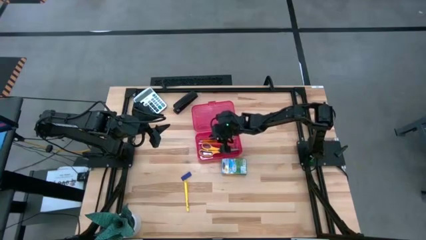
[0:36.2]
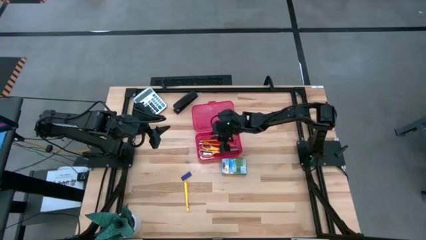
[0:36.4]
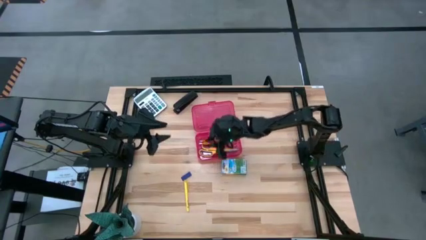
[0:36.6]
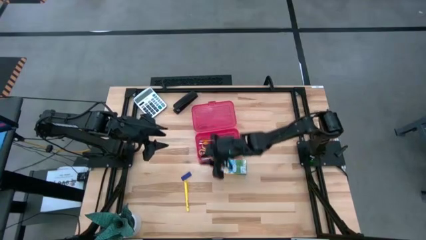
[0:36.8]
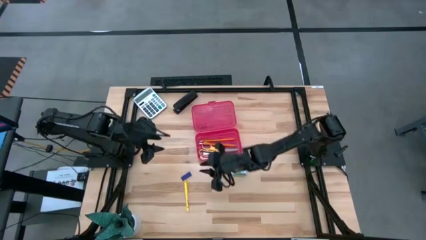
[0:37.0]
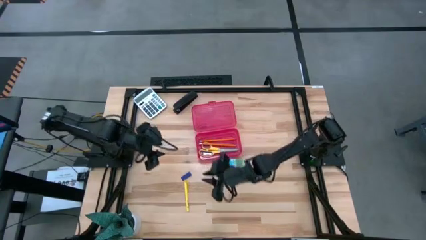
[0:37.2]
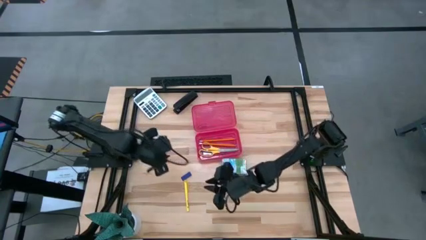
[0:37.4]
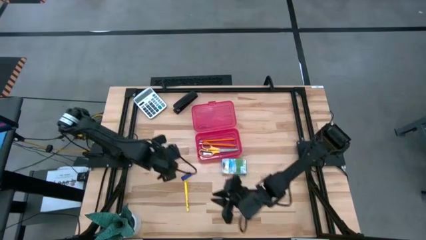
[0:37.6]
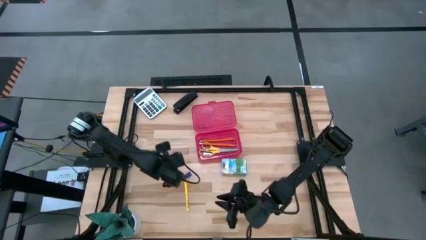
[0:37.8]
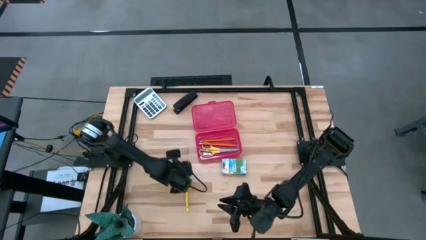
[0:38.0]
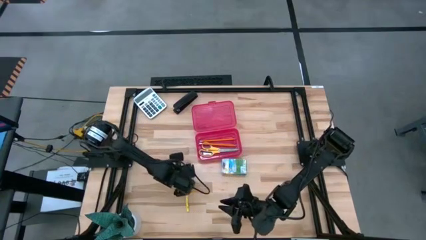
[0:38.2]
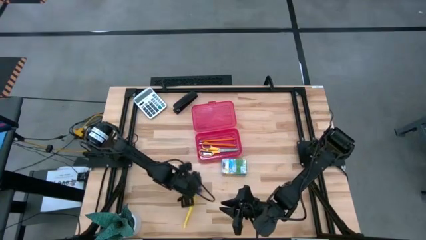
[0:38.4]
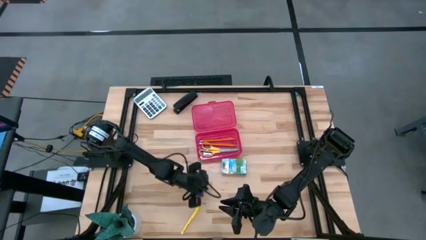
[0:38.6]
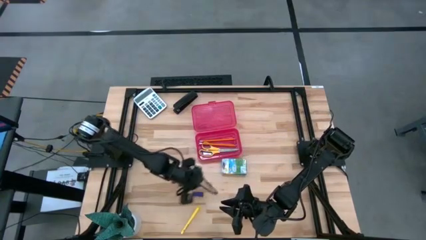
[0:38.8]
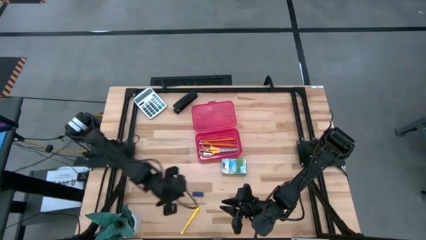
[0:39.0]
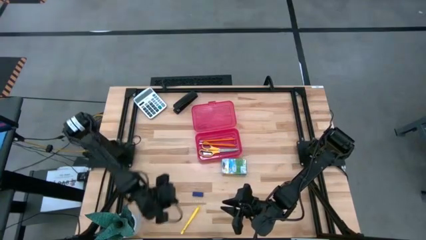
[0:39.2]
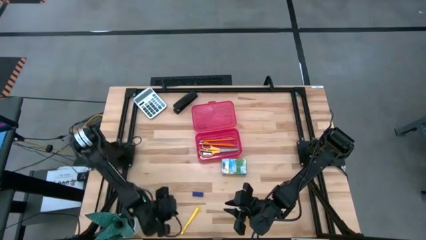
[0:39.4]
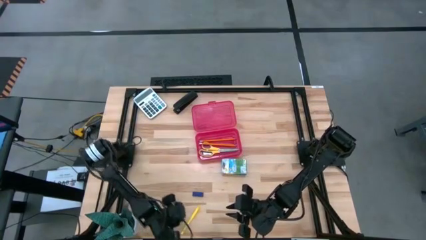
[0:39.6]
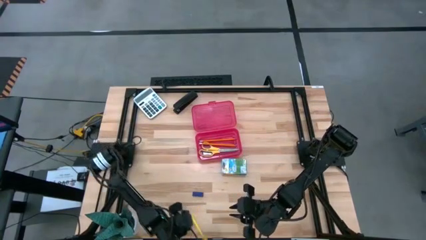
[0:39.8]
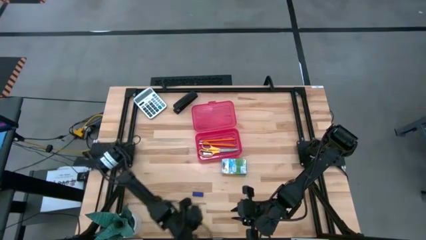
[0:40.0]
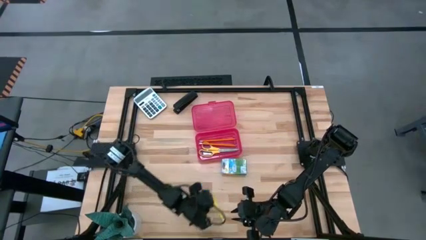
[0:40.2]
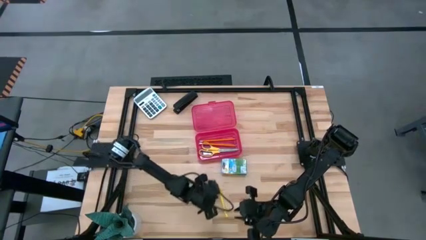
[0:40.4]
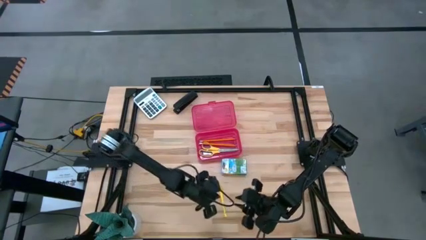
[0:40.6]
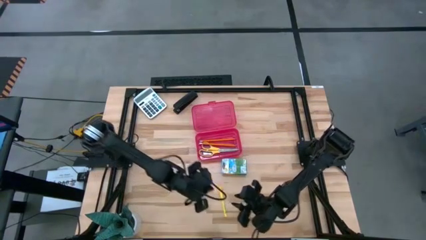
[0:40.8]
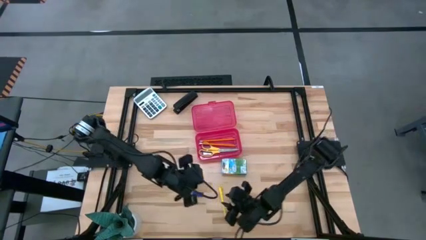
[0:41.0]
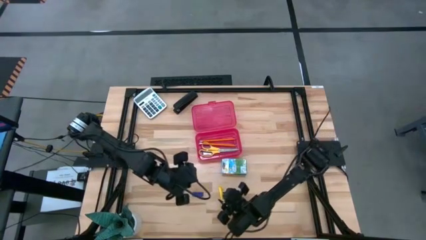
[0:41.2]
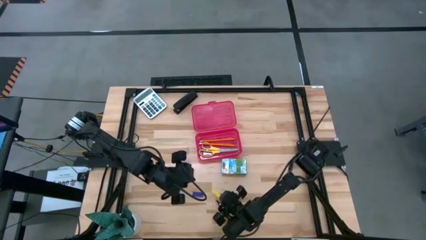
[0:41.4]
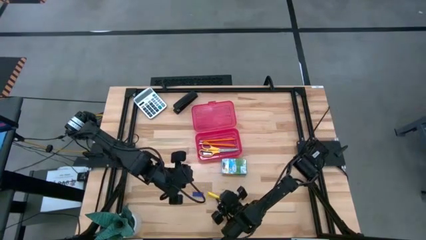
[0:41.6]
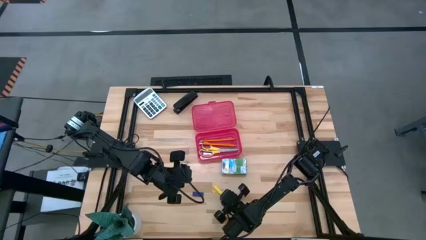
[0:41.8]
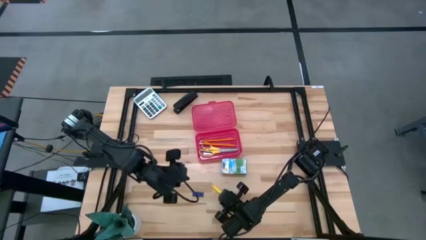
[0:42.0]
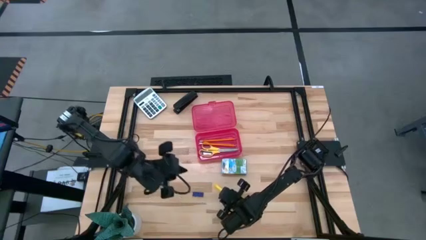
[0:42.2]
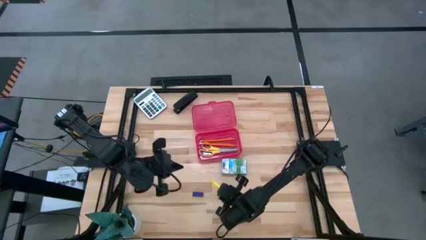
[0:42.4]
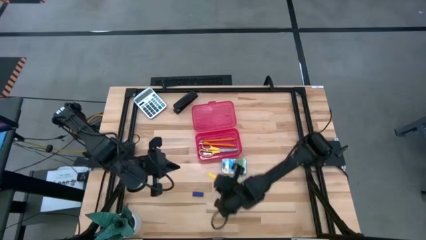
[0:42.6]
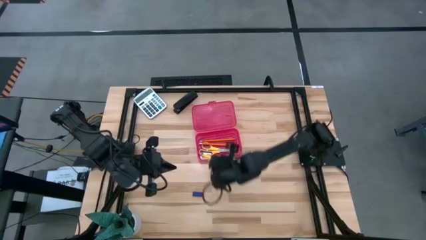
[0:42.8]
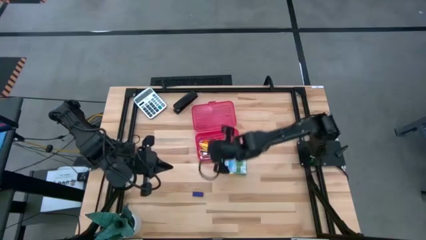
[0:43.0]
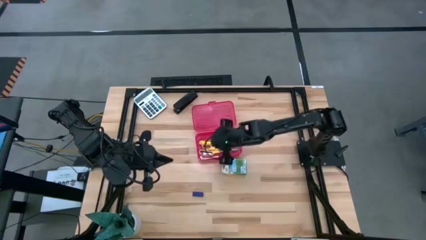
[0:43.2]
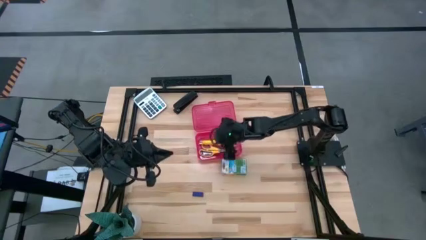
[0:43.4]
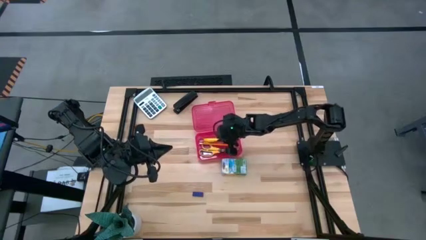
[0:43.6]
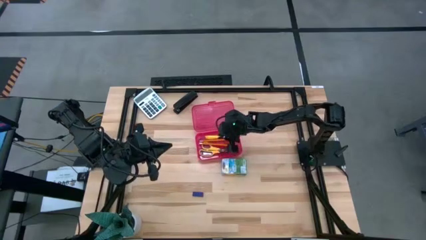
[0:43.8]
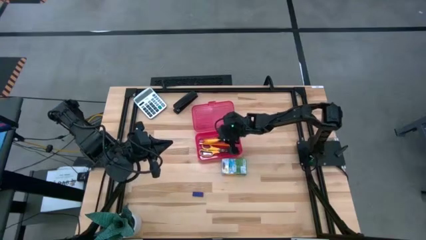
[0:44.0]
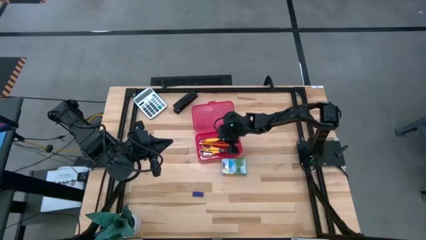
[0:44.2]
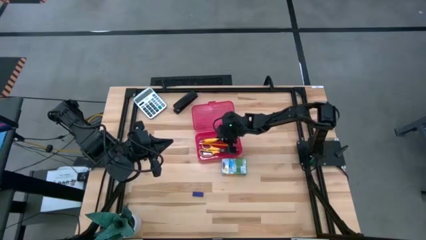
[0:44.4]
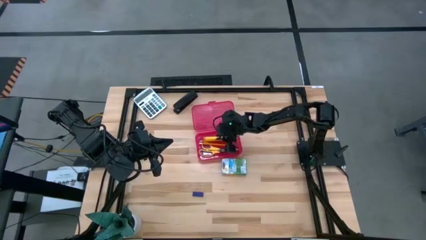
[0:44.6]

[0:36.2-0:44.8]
Task: Pack school essentials
Put the yellow pen into the red supply box

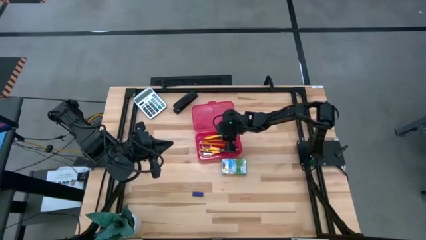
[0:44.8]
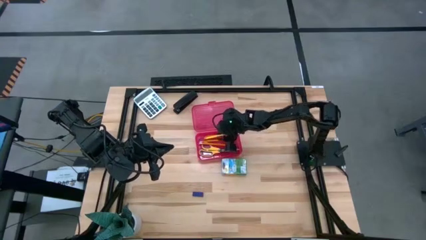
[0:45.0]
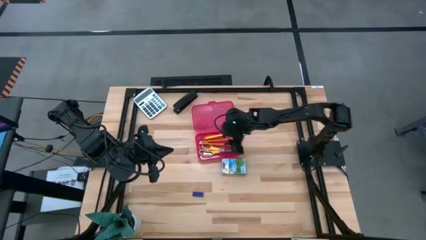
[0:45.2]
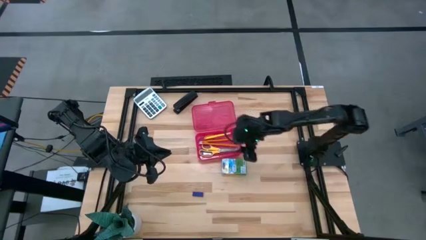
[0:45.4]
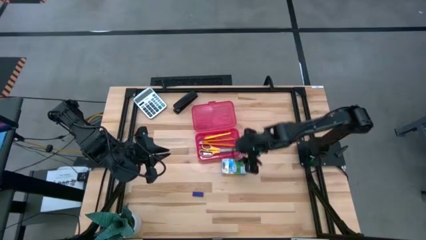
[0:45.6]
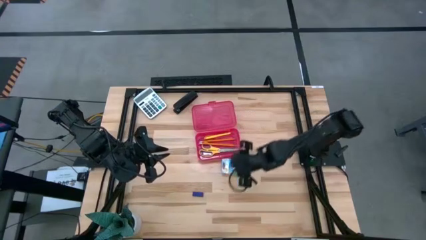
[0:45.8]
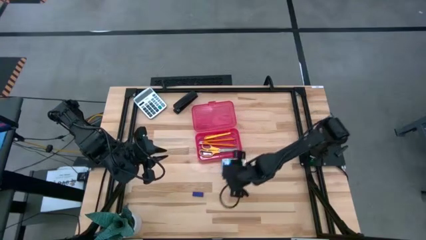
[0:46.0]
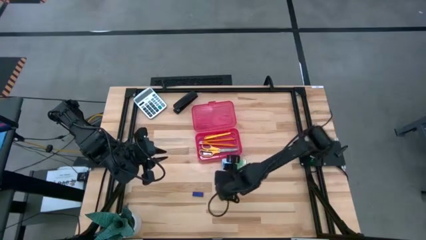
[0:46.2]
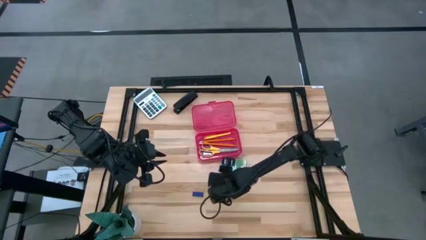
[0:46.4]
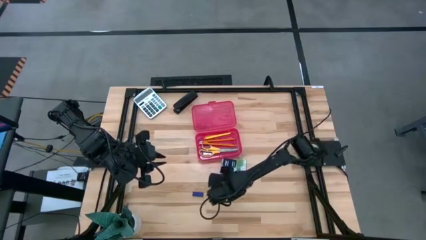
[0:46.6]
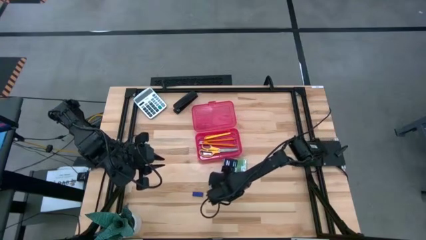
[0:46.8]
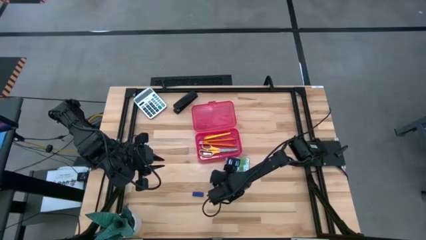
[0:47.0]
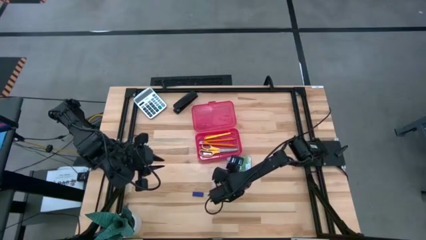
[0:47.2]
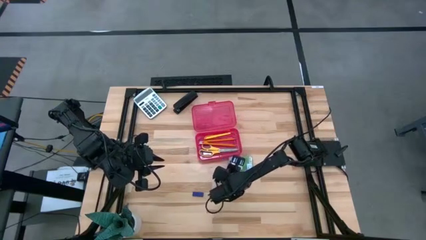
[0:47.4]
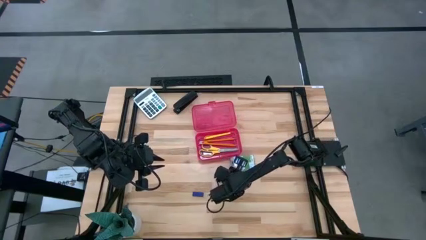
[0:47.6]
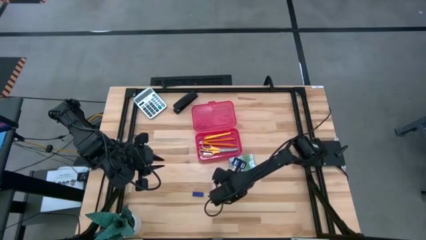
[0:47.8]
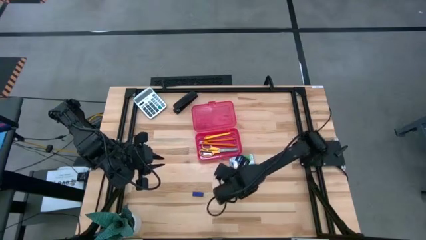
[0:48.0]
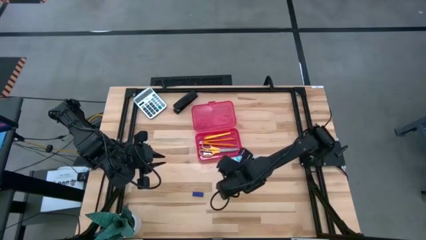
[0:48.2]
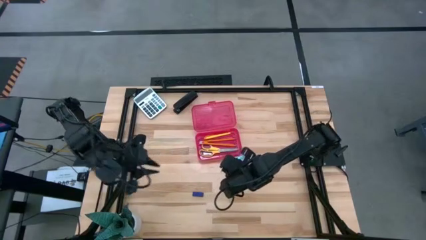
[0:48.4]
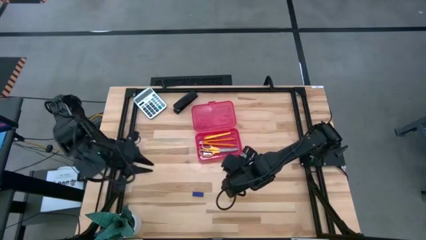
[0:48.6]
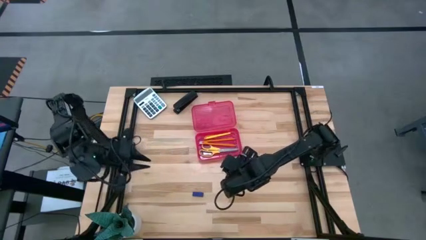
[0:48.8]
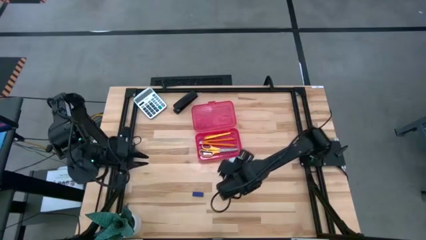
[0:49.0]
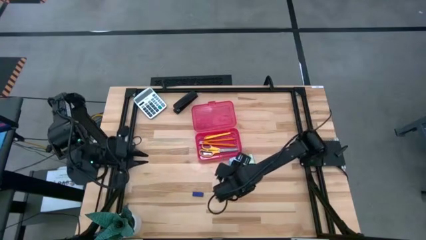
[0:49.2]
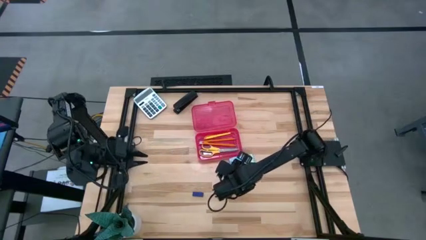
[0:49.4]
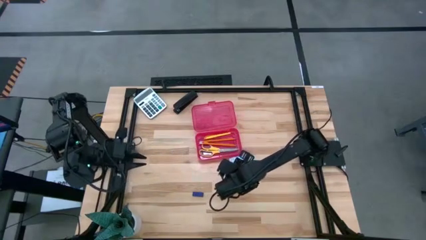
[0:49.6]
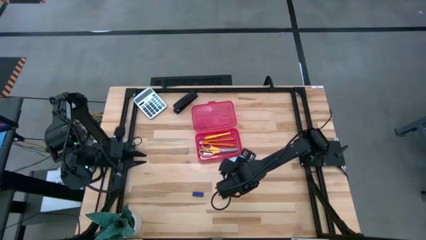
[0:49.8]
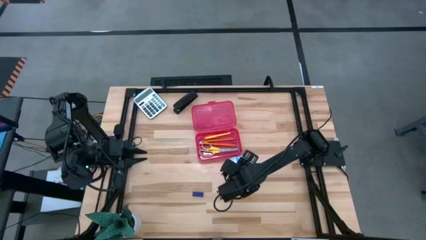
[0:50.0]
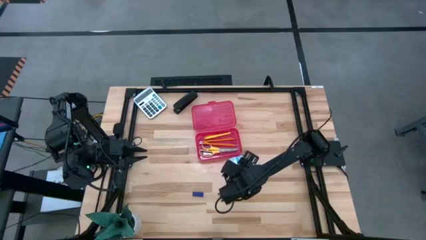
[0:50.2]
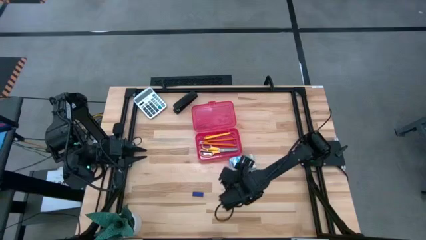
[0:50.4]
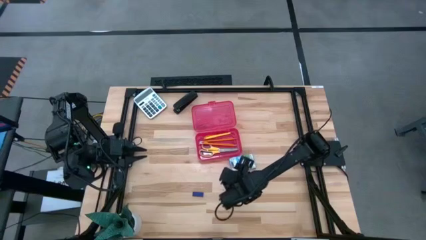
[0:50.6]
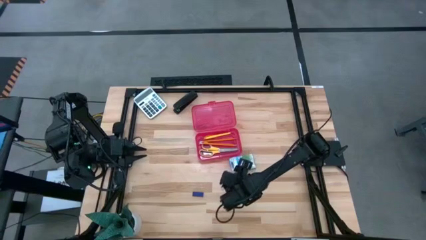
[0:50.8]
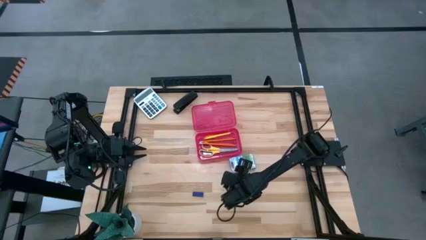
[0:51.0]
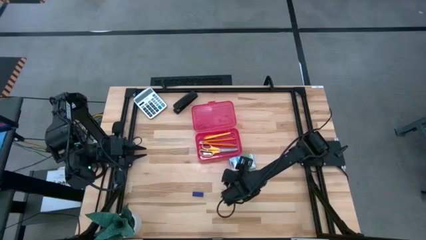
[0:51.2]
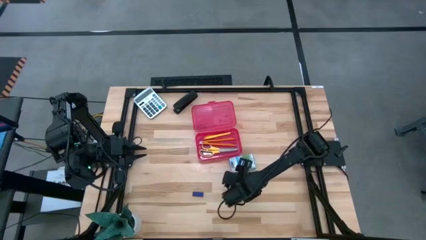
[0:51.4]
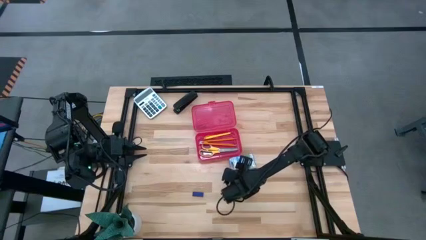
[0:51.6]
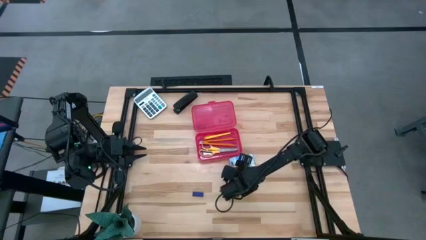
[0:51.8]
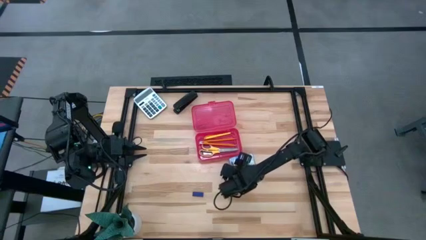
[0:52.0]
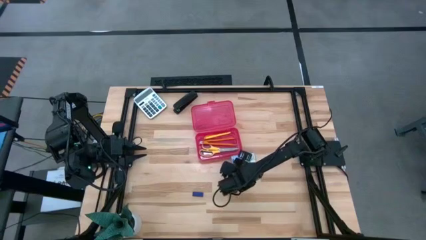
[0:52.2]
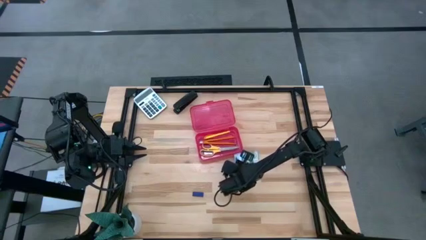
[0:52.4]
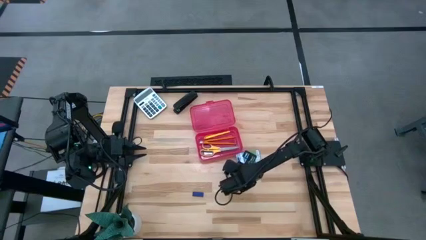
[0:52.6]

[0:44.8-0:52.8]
Put the blue crayon box into the red supply box
